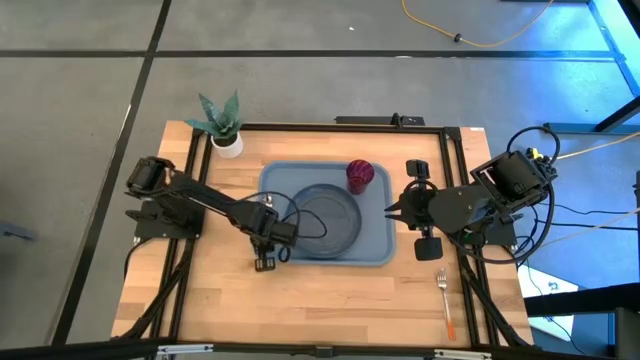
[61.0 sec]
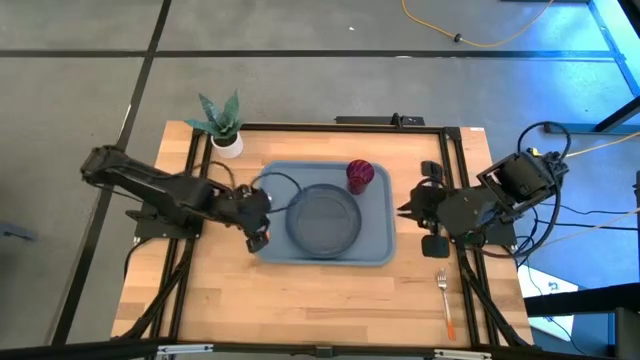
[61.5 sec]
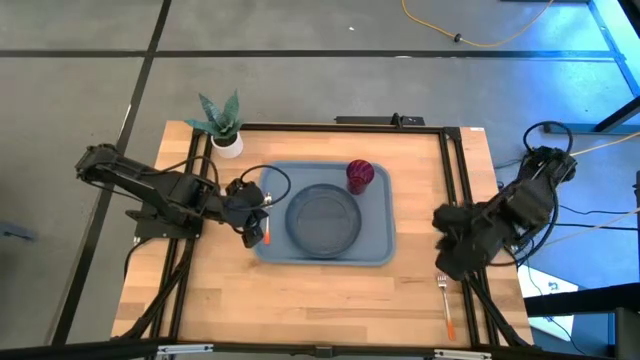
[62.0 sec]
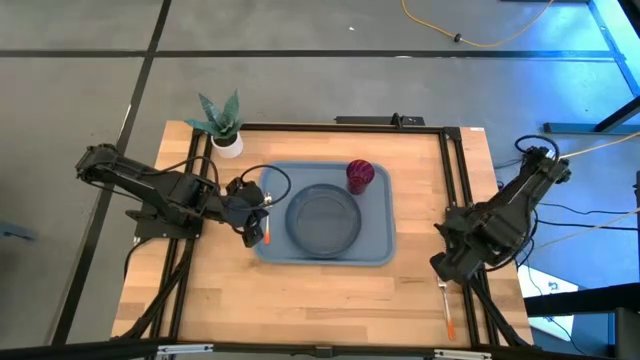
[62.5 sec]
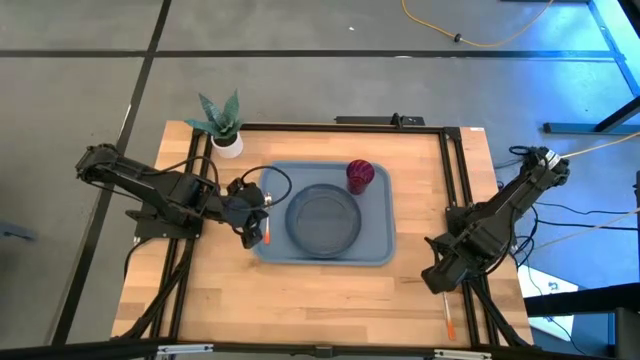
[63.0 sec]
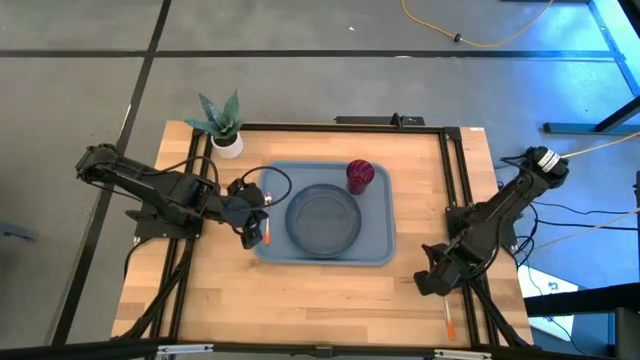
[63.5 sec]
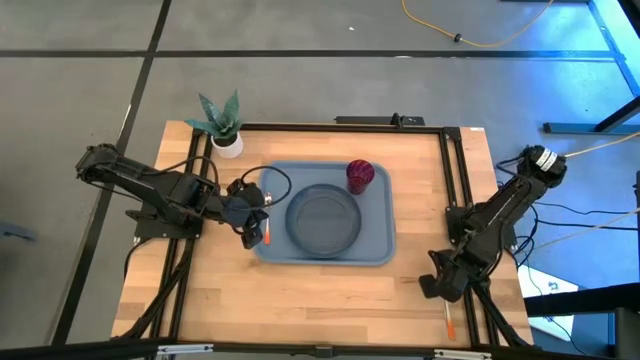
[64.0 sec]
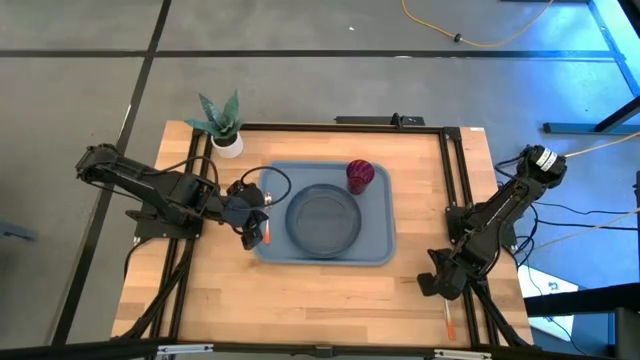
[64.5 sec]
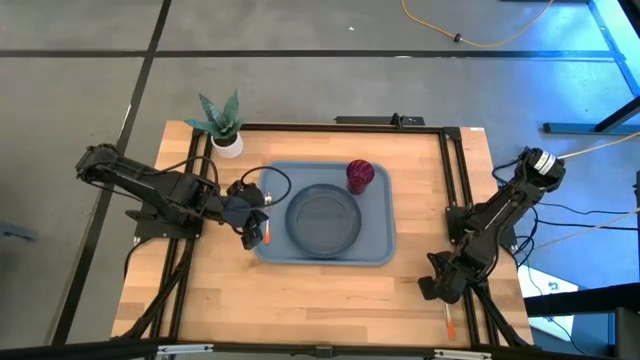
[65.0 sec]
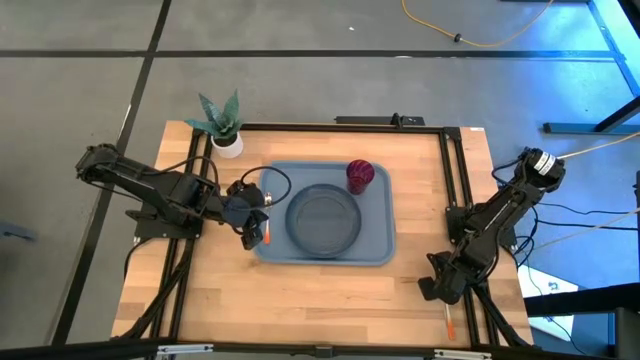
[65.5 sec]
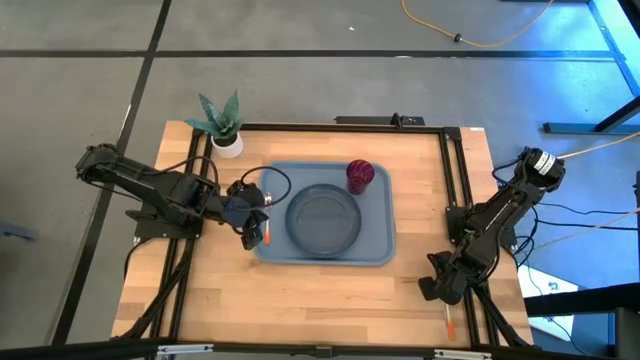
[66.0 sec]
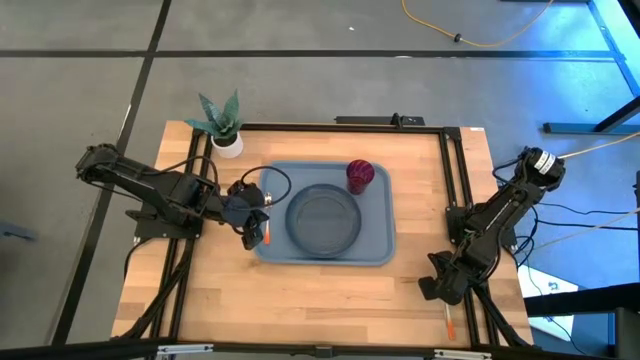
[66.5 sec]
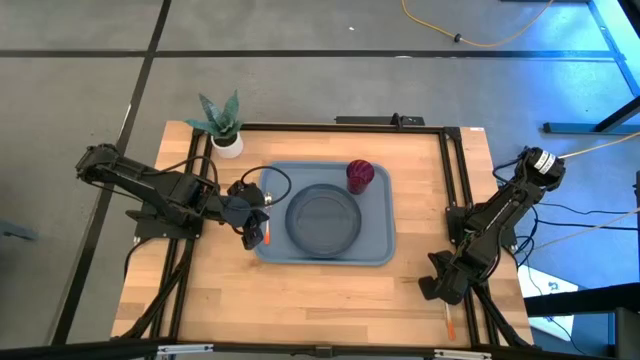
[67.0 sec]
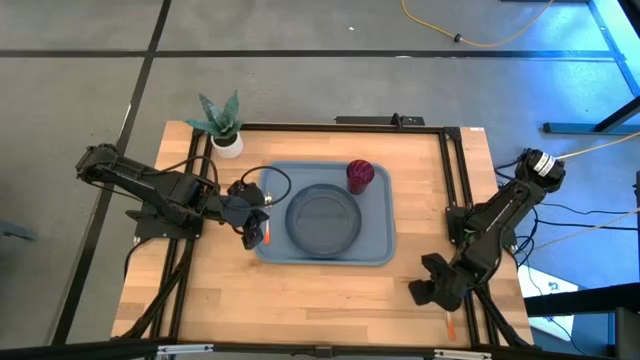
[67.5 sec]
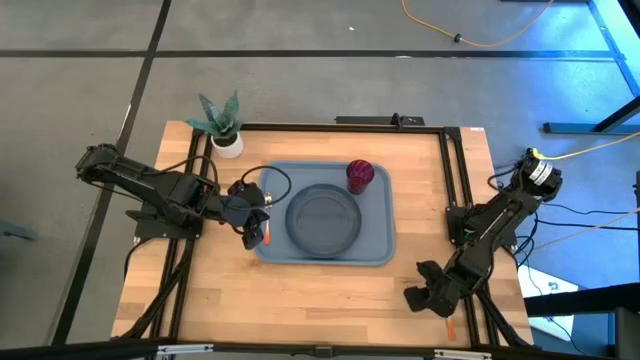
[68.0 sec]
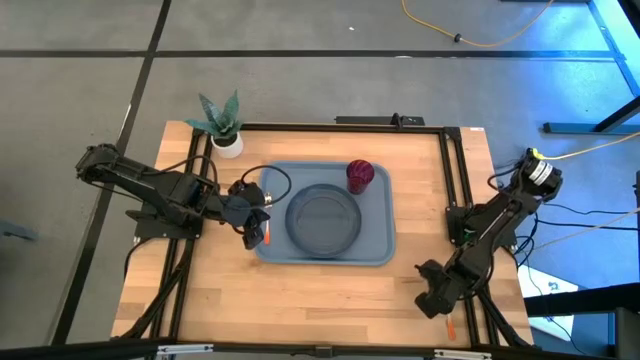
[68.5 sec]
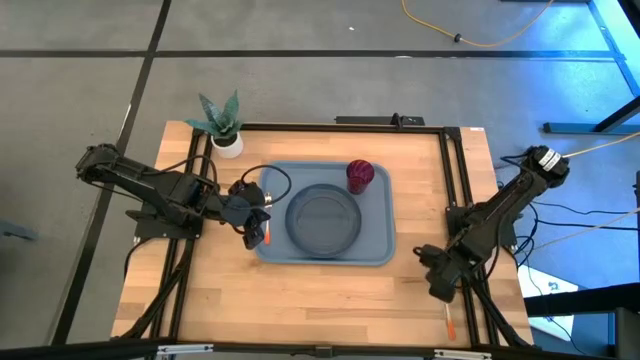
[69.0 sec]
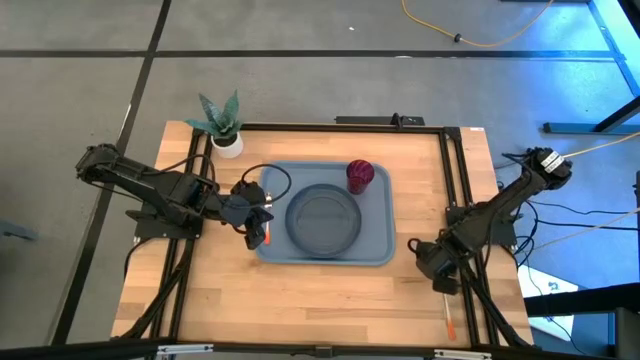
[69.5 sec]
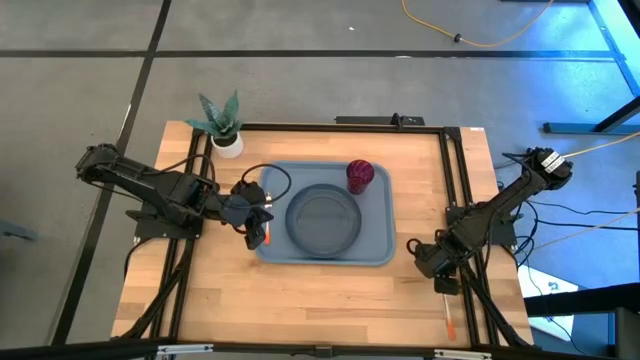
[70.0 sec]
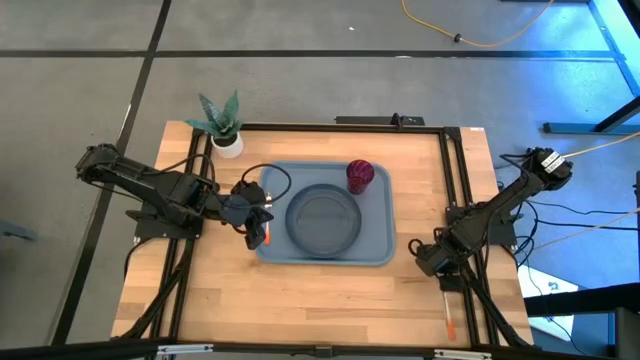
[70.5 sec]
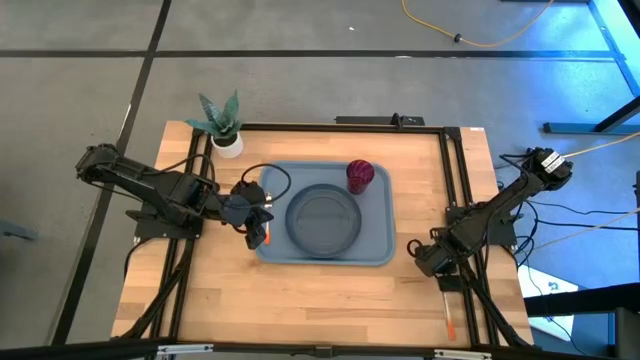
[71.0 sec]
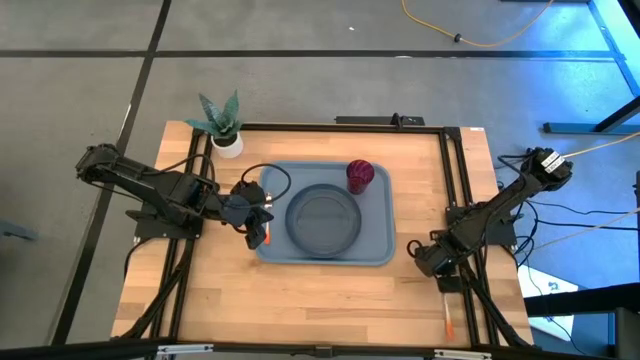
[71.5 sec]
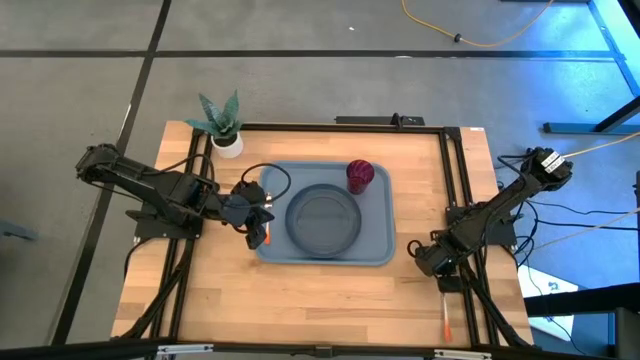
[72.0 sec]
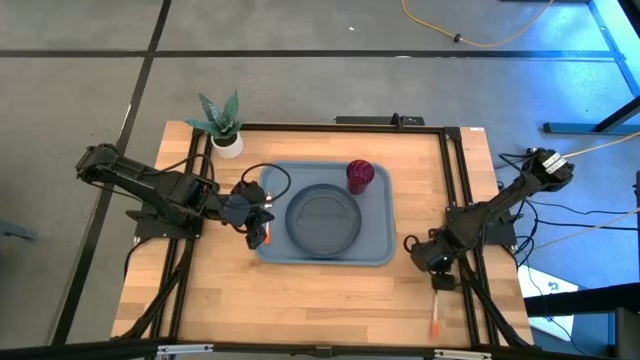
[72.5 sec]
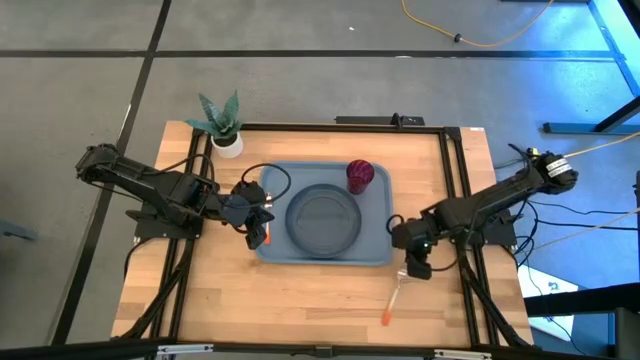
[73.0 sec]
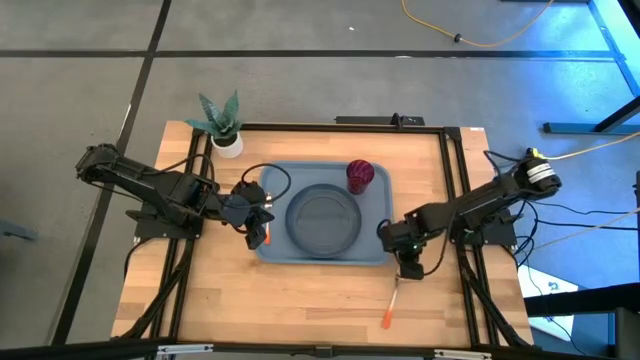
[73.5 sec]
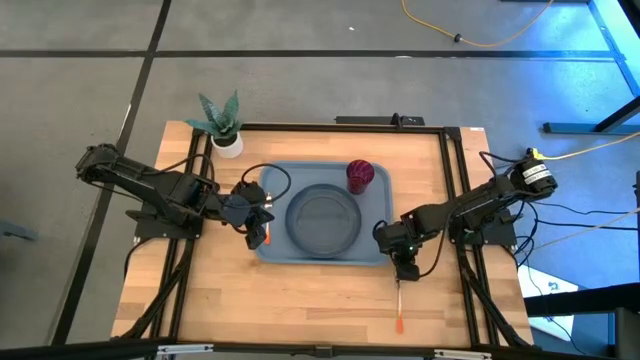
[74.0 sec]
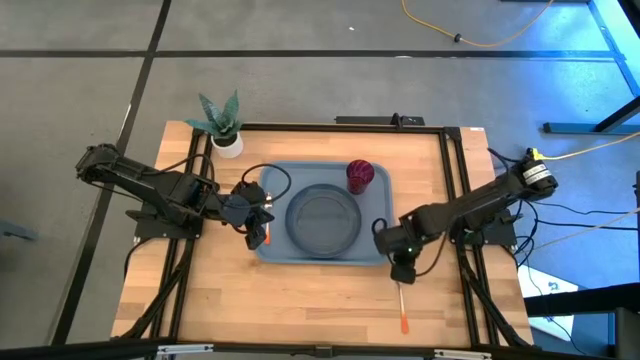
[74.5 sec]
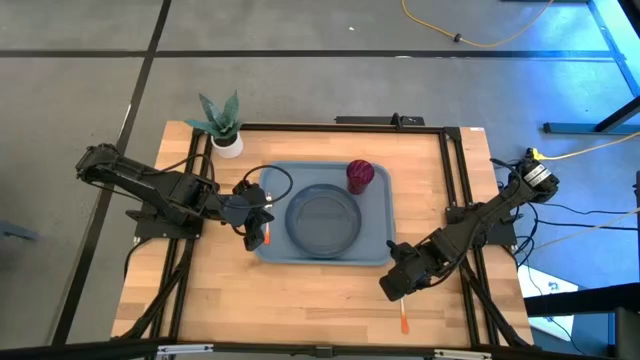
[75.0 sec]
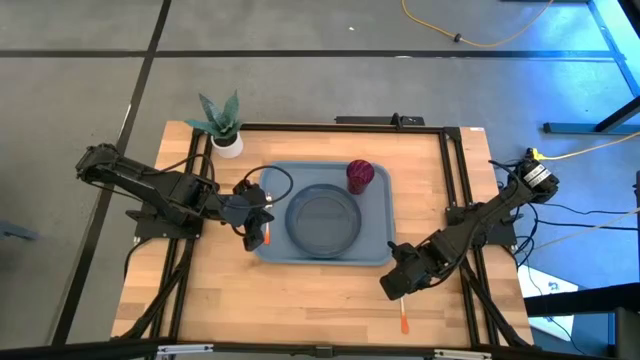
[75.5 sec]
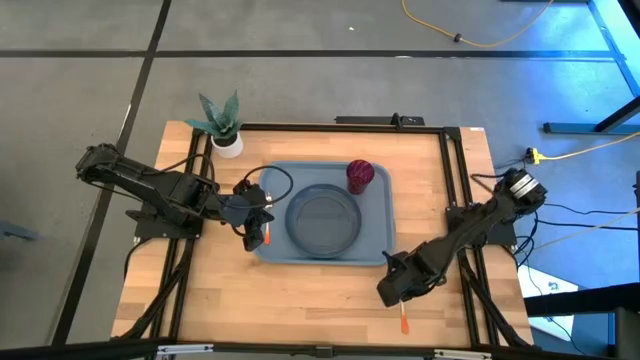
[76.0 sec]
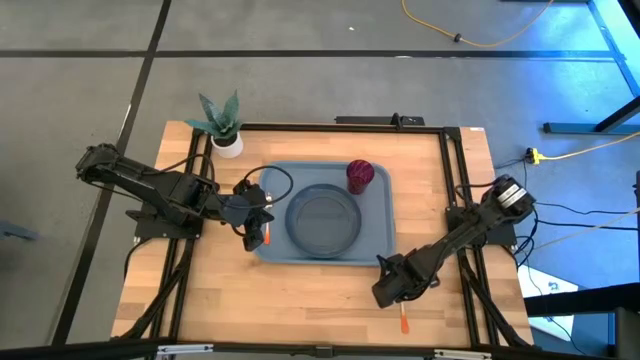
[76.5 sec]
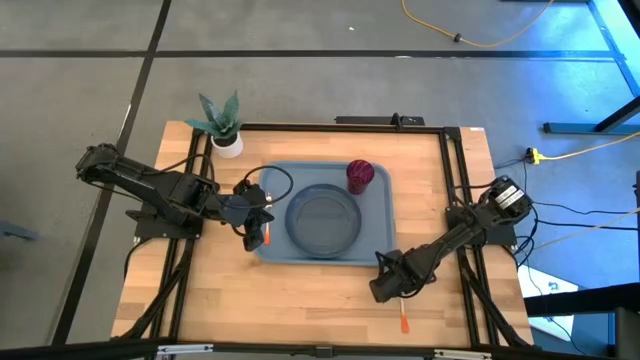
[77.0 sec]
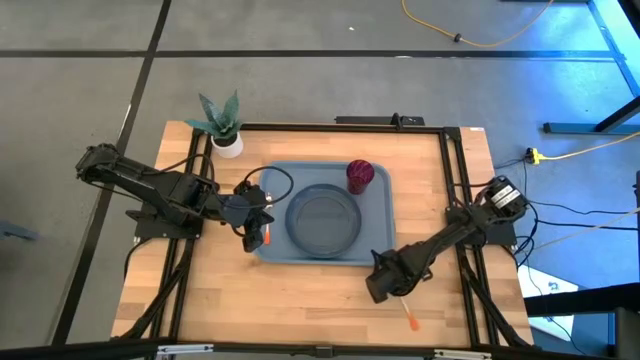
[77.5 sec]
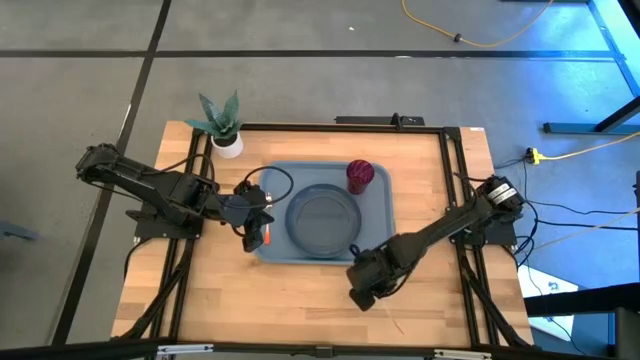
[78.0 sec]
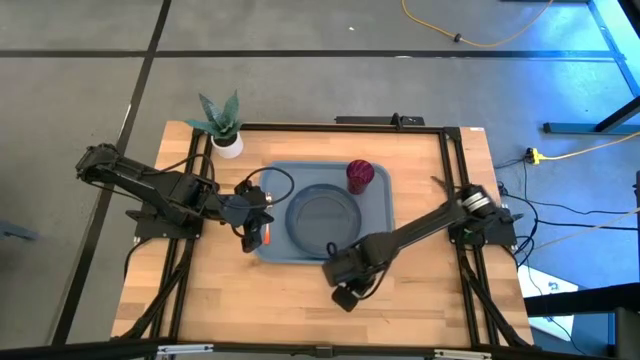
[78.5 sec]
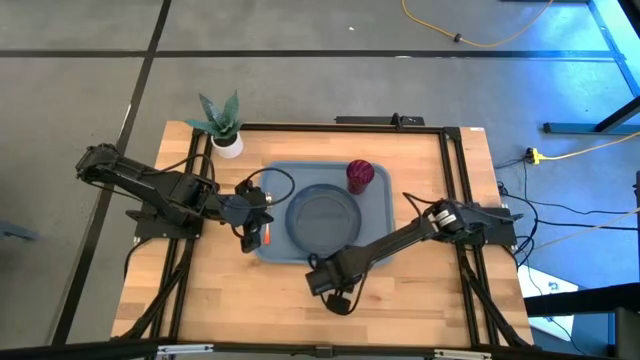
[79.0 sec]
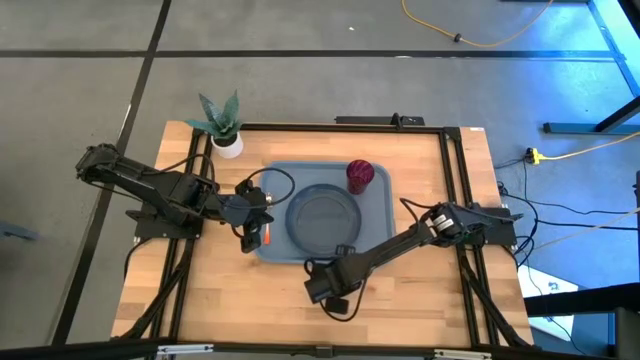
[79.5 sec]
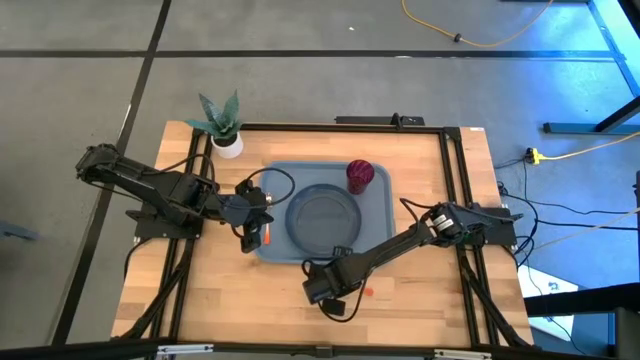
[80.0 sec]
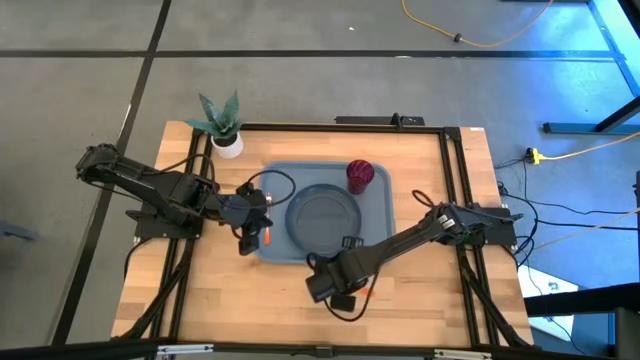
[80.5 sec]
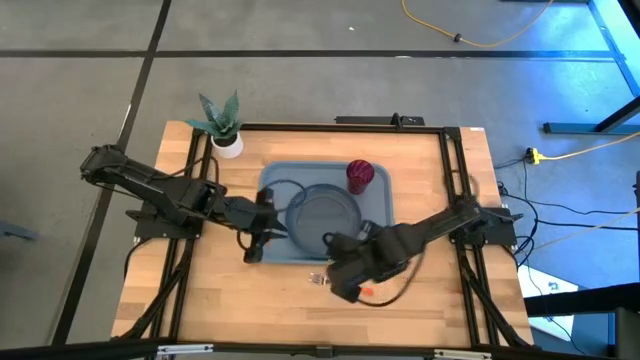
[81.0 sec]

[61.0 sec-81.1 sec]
Task: Pick and place plate/cup/fork/spoon on tray
Put the orange fork on the blue tray

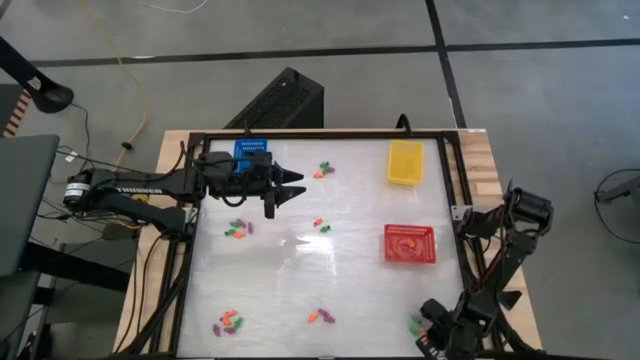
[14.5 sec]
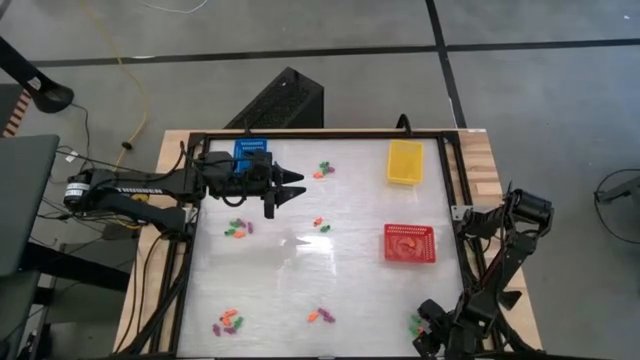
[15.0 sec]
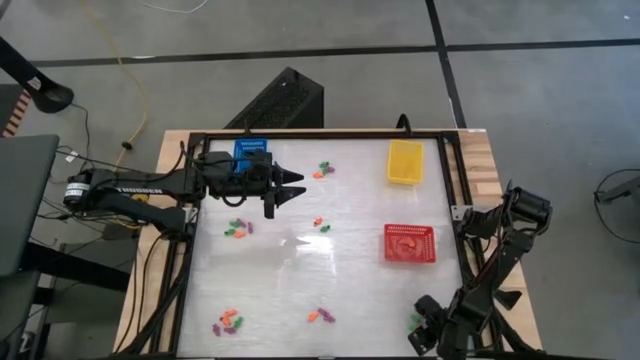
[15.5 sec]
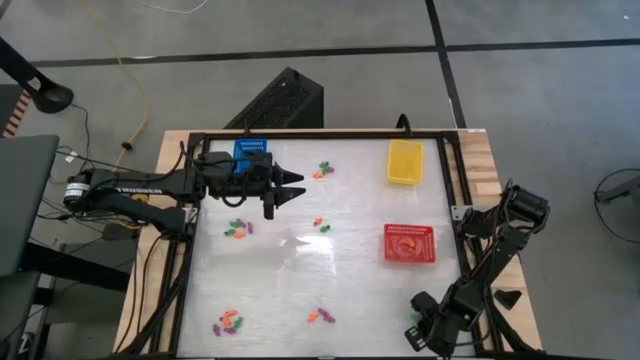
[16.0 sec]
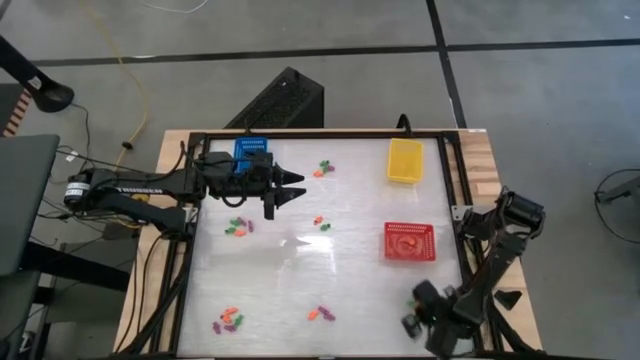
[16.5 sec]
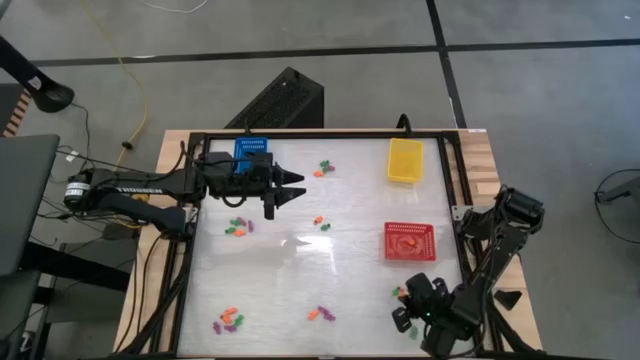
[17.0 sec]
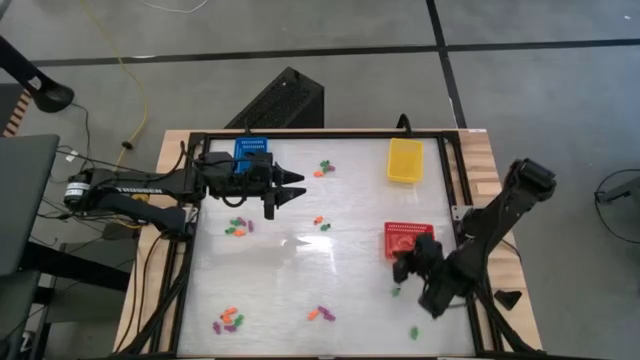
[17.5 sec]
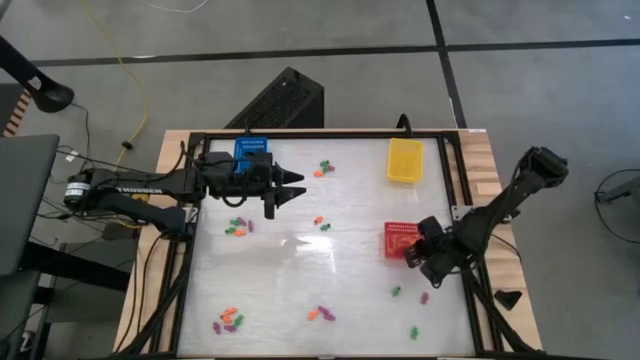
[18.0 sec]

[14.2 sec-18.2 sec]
Task: Sort Halloween decoration
Put the orange skeleton toy into the red bin
